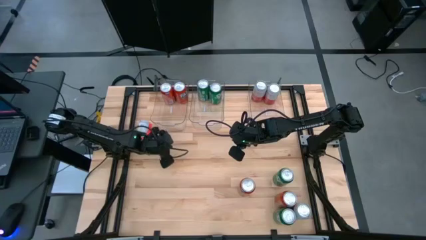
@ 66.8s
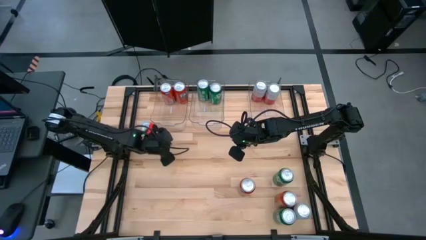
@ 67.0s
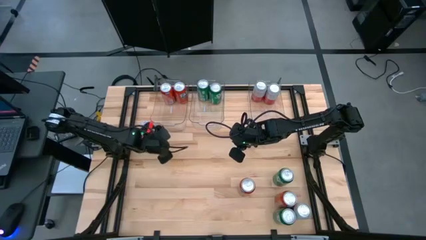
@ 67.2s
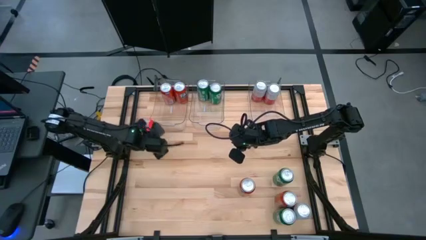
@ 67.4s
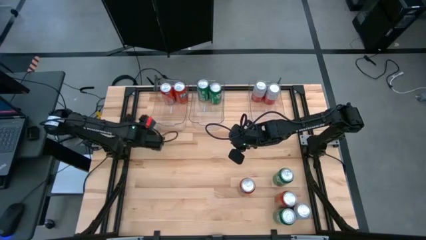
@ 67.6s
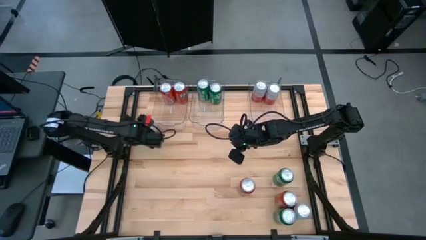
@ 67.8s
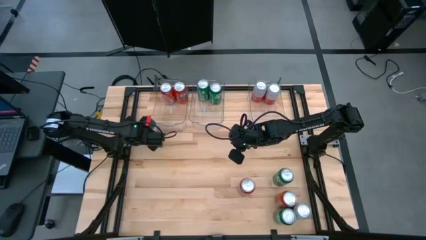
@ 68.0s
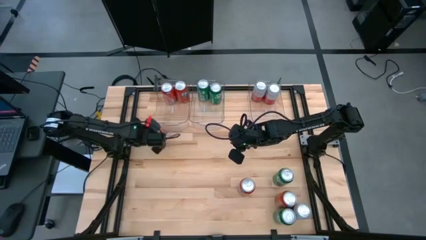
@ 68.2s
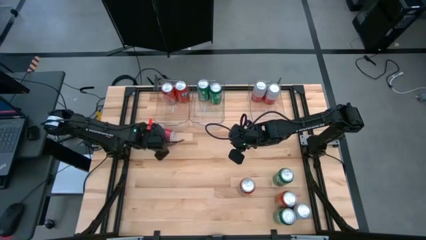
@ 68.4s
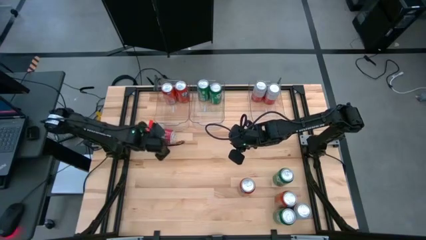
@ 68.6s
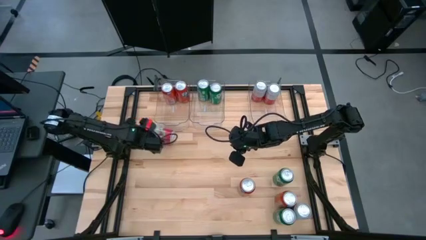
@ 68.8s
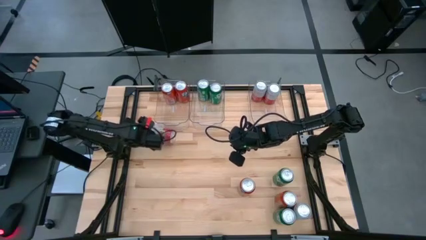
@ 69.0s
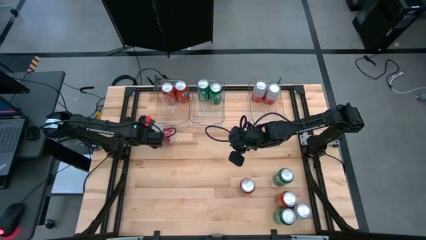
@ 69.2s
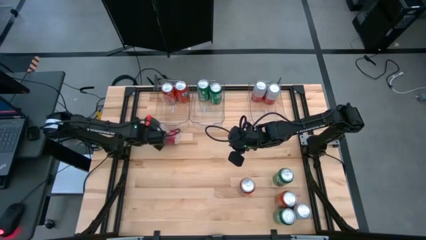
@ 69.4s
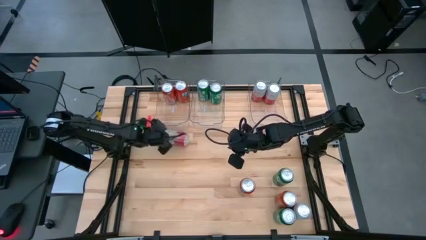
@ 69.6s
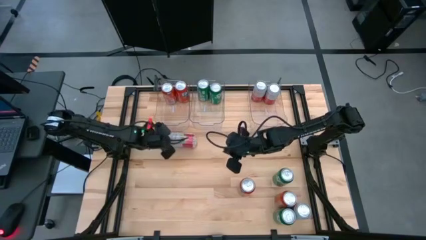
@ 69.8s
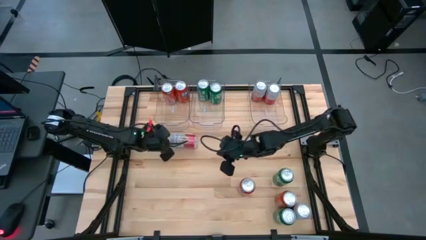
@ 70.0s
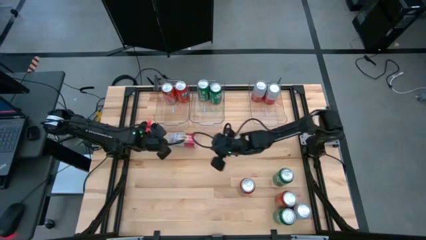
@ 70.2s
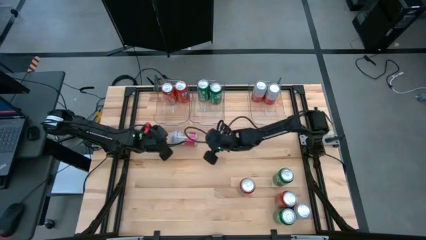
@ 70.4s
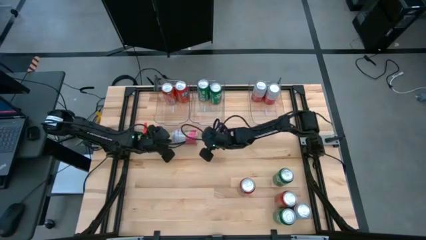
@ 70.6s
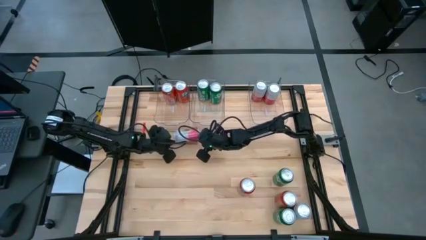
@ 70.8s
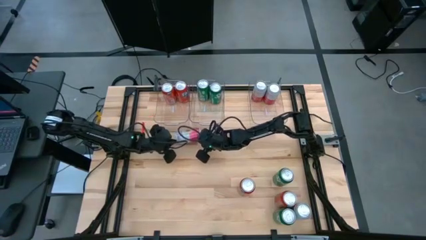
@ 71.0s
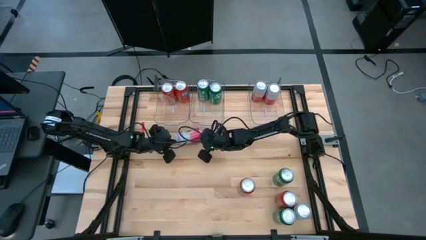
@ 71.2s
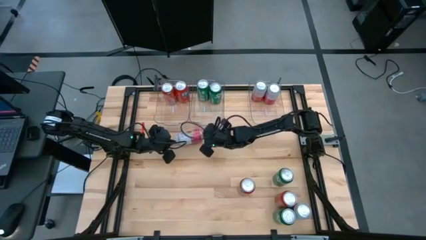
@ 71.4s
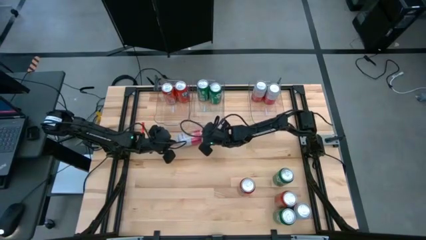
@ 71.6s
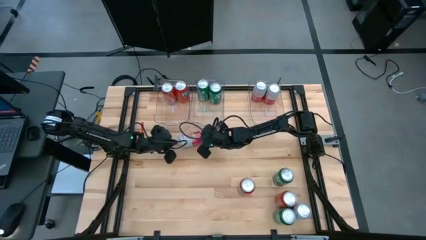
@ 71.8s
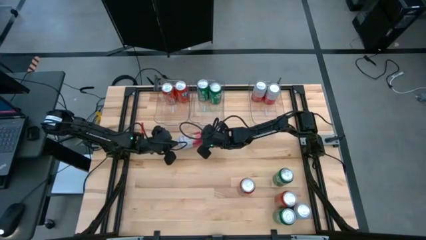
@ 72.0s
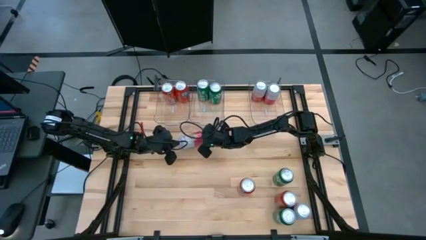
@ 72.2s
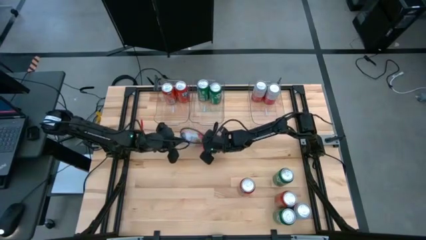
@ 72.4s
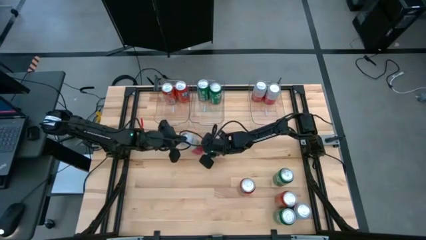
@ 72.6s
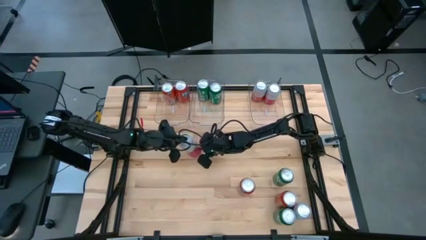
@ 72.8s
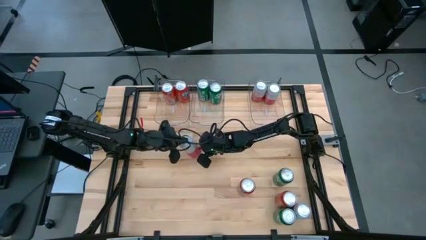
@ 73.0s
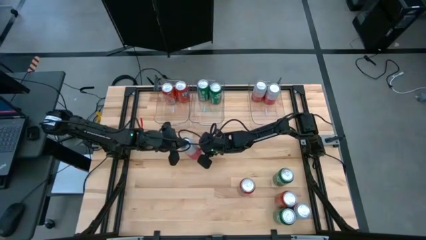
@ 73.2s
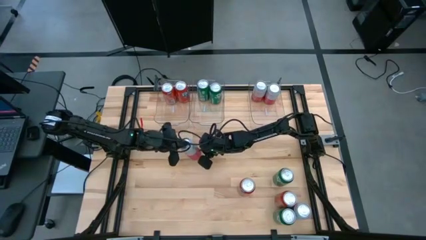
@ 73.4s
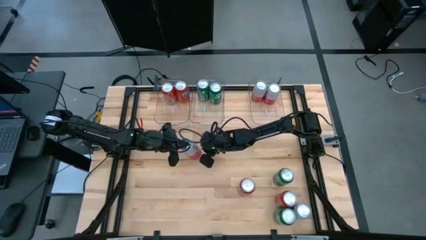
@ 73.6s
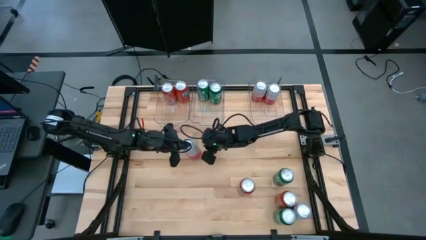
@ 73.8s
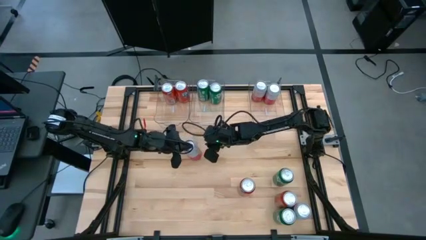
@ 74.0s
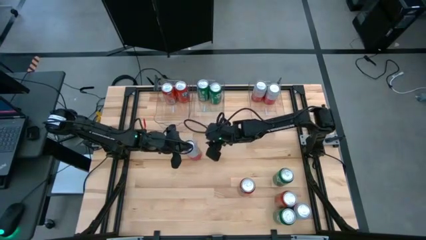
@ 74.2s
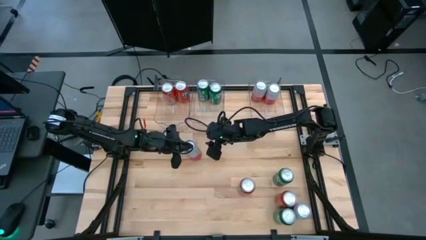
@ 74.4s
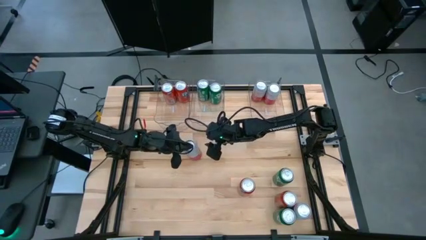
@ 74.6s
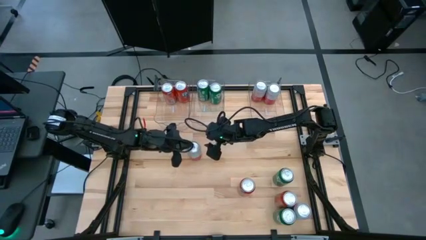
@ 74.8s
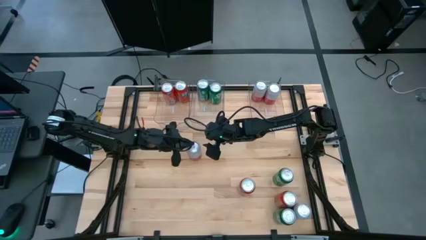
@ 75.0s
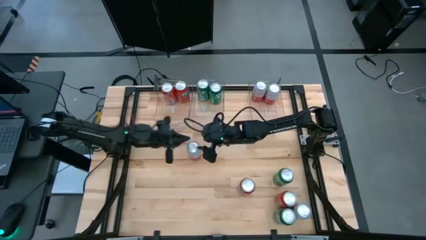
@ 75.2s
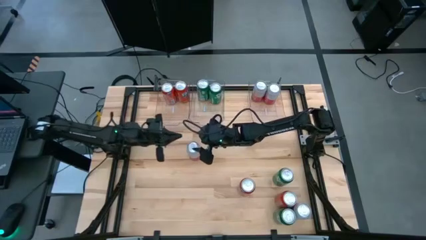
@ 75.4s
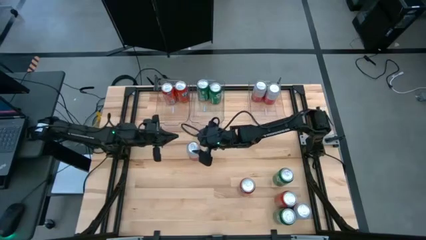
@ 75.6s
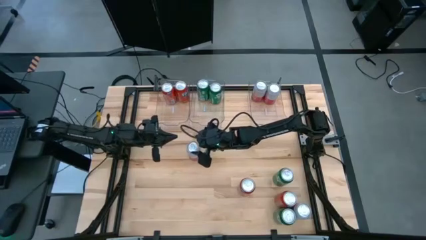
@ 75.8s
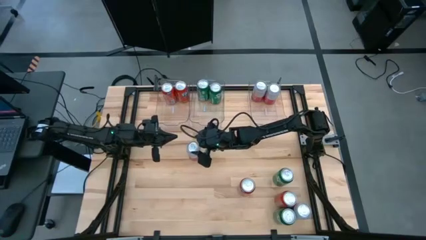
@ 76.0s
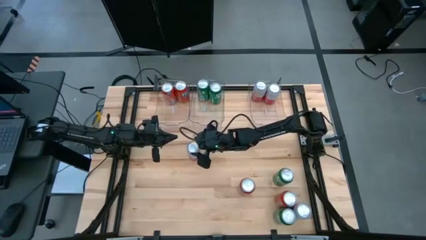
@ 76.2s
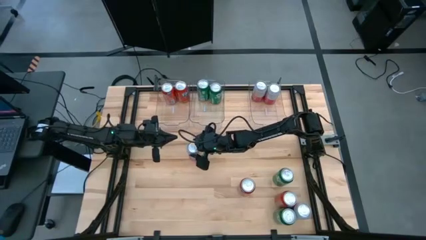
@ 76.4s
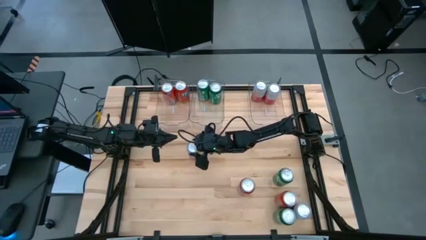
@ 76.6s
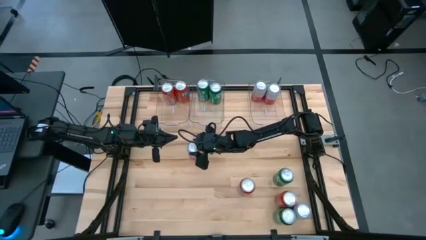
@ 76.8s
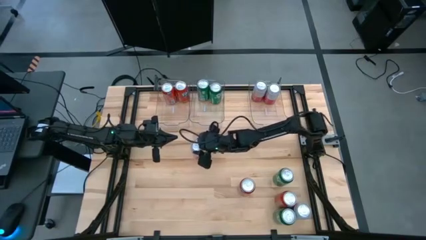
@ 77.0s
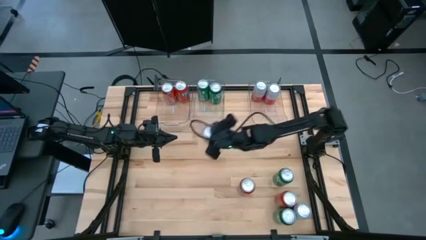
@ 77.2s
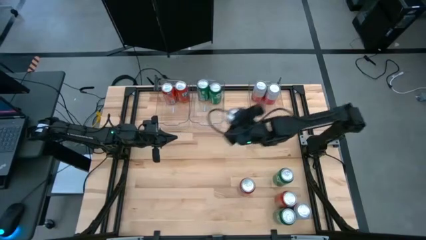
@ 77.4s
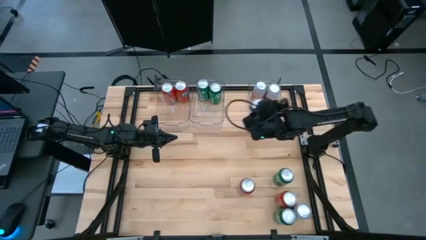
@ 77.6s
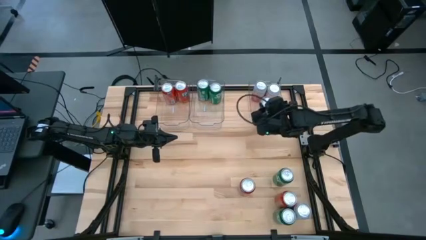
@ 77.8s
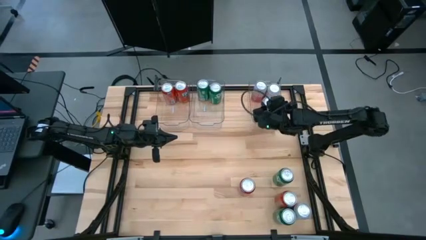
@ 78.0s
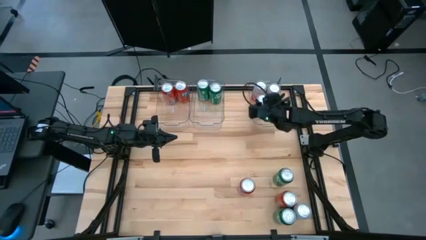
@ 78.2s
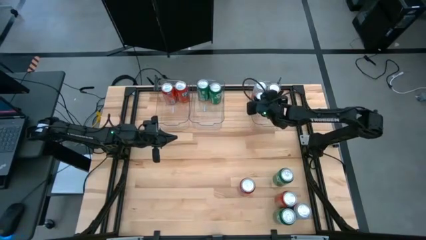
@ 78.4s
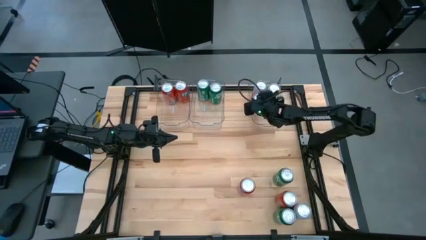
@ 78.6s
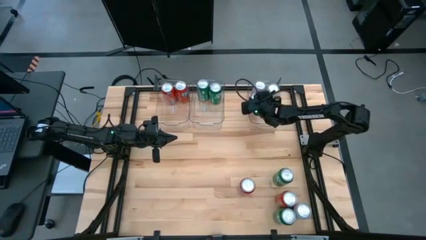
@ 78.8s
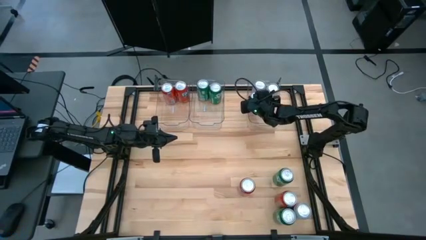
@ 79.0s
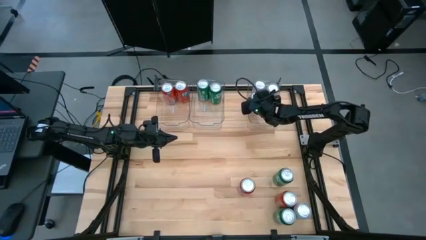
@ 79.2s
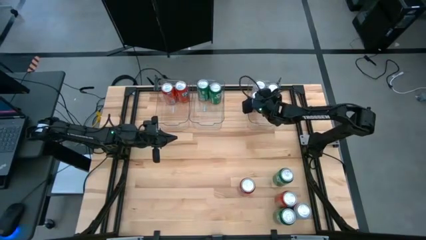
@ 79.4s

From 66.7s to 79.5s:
Task: Sort soda cans
Put the top pink white soda can into the right transparent bin

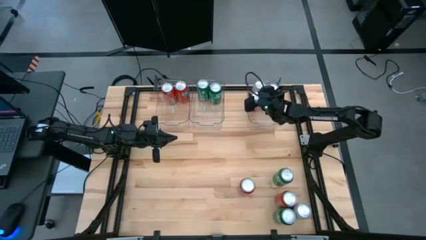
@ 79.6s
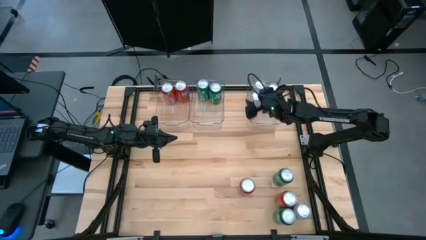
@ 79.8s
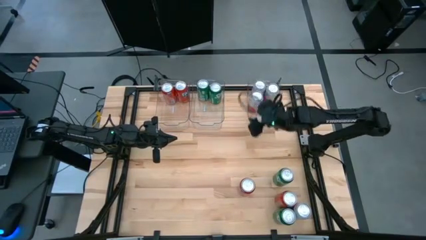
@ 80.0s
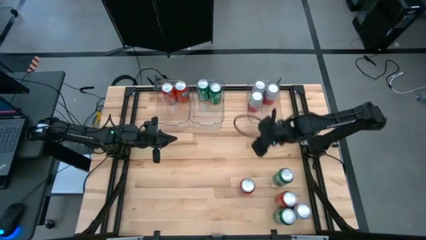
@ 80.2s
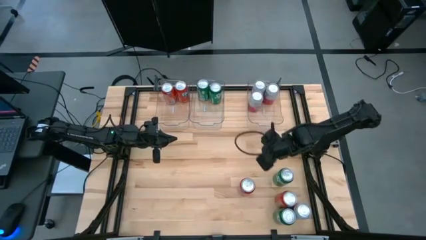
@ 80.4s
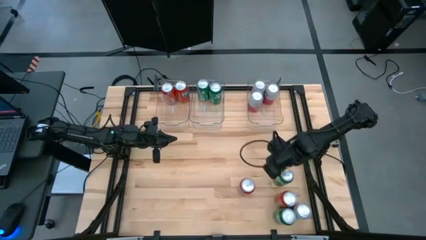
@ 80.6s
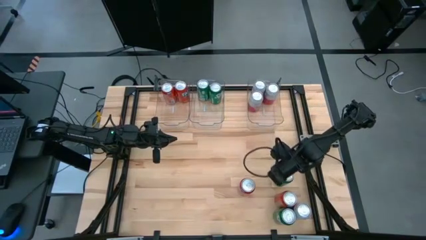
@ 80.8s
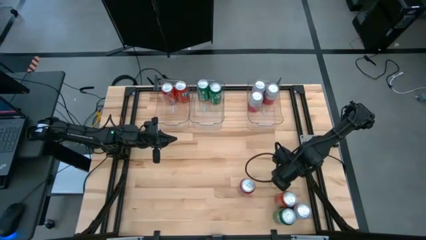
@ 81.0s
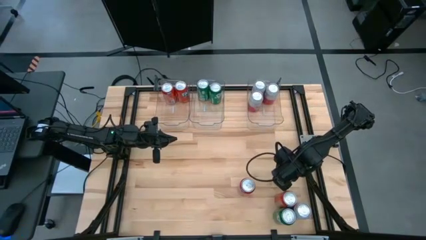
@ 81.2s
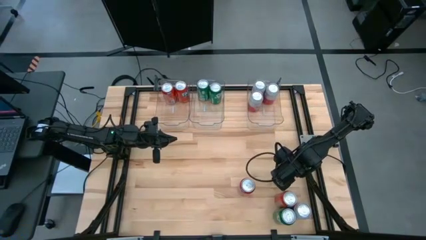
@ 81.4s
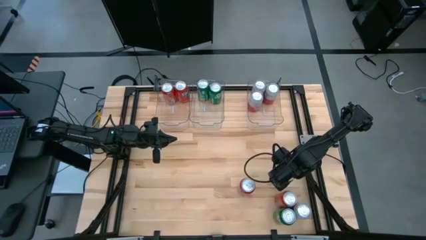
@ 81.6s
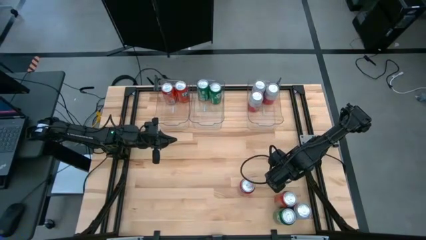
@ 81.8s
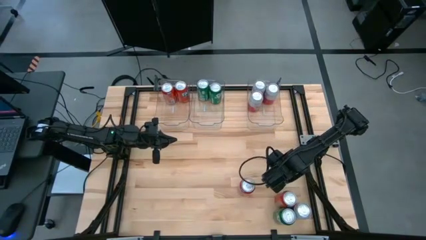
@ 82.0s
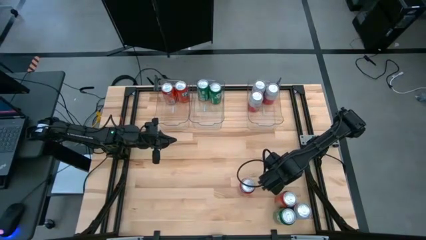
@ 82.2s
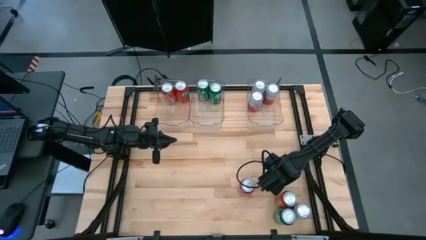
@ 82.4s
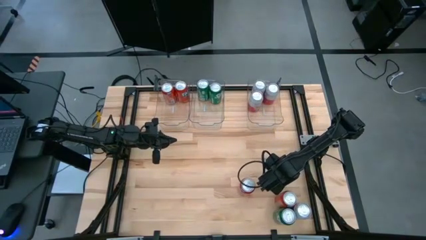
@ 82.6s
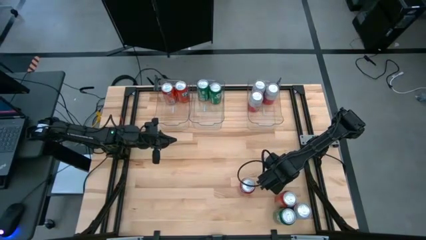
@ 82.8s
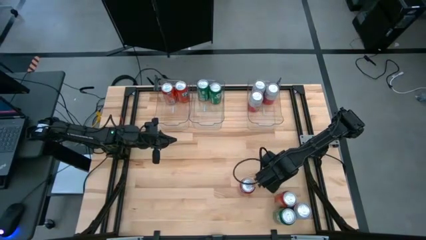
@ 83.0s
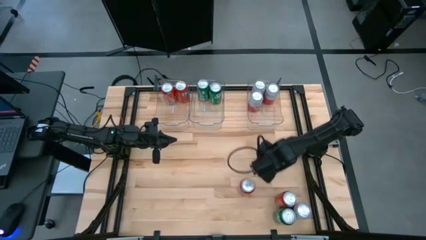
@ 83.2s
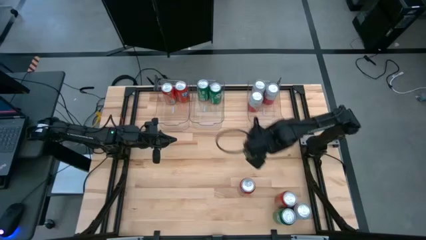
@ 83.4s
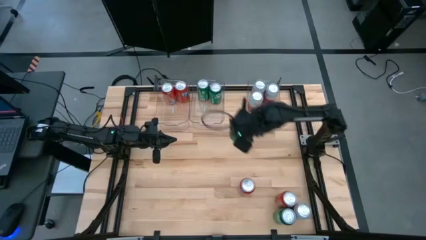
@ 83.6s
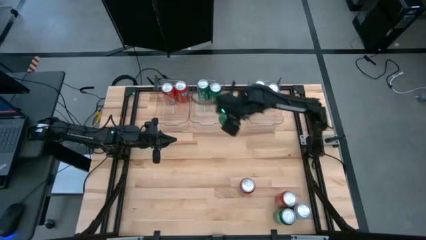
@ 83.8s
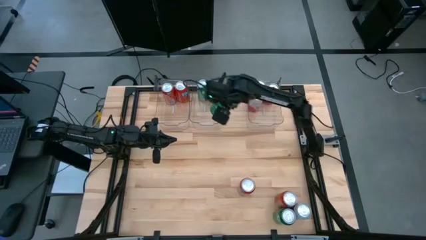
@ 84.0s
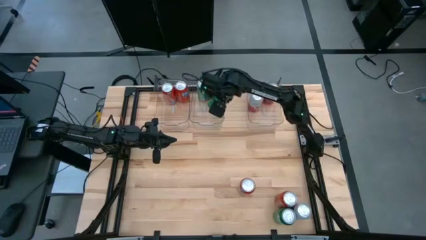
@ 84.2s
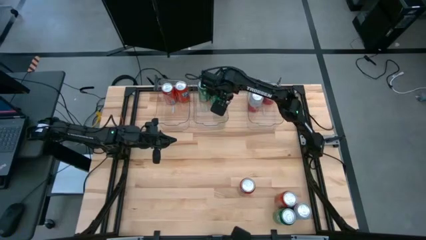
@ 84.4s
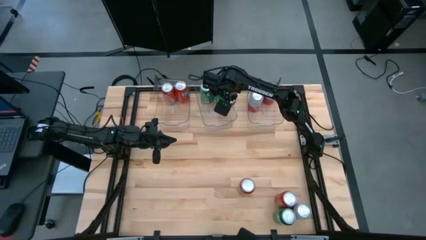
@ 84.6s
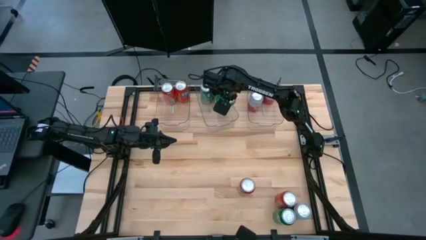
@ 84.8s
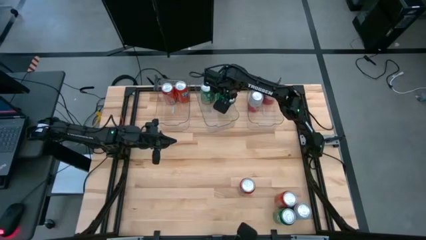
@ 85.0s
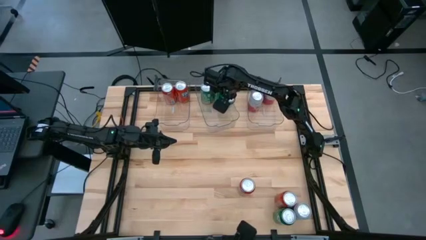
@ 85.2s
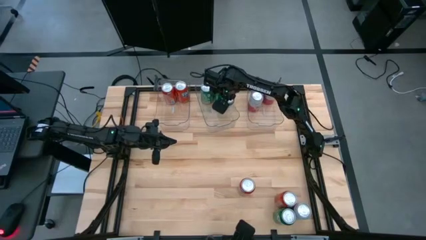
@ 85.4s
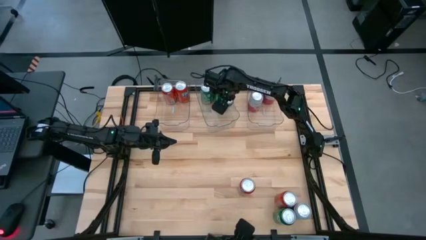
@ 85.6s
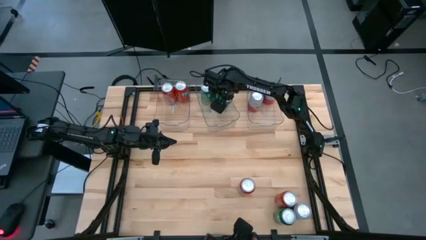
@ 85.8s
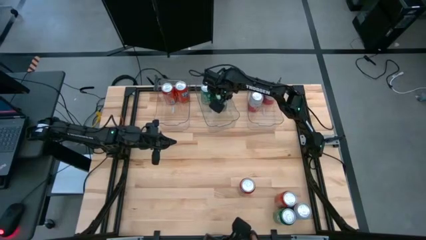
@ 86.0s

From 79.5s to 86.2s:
Put the top green soda can into the middle transparent bin
